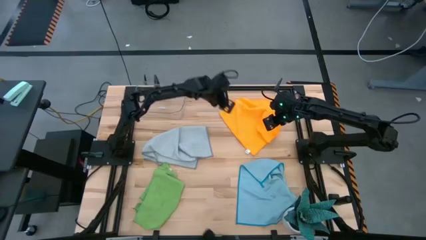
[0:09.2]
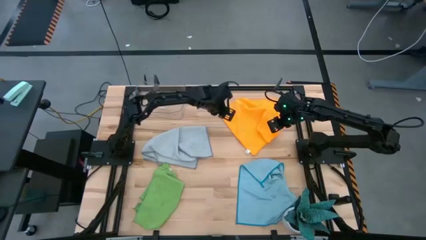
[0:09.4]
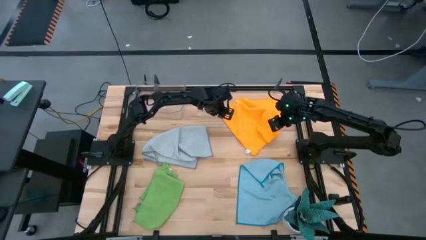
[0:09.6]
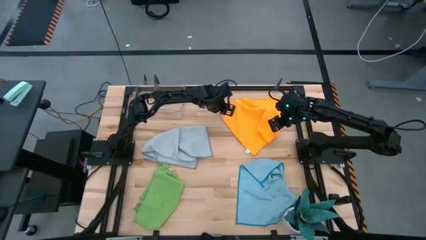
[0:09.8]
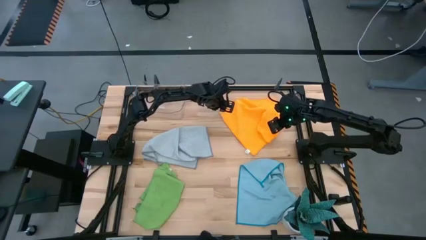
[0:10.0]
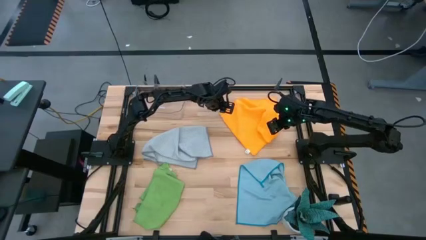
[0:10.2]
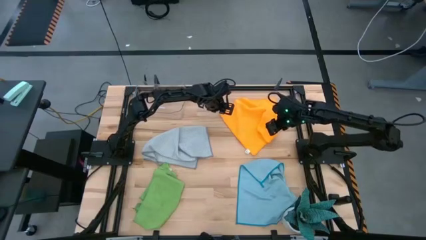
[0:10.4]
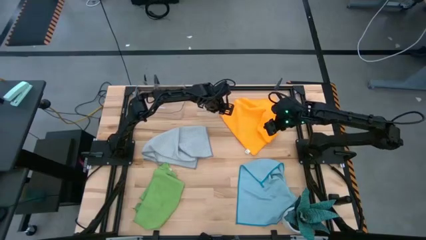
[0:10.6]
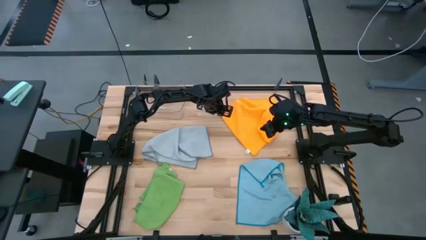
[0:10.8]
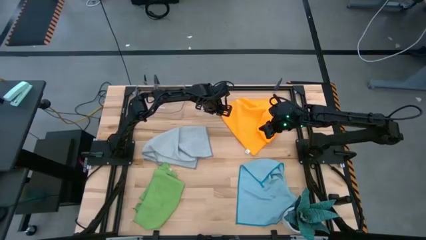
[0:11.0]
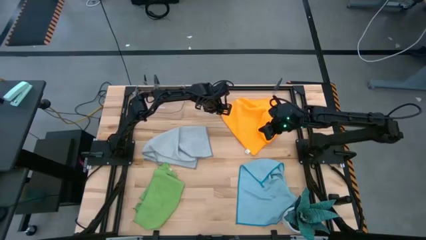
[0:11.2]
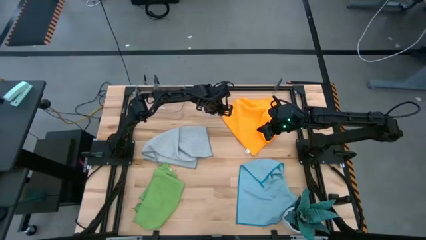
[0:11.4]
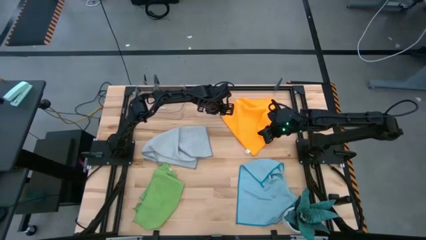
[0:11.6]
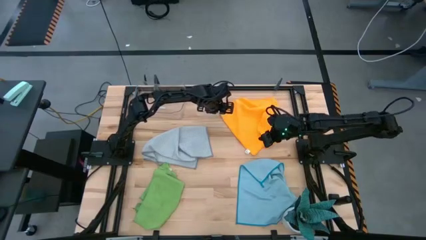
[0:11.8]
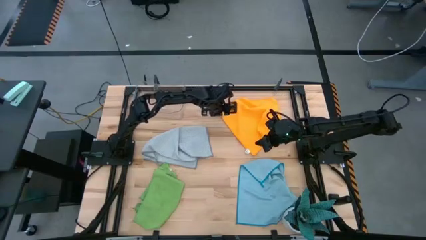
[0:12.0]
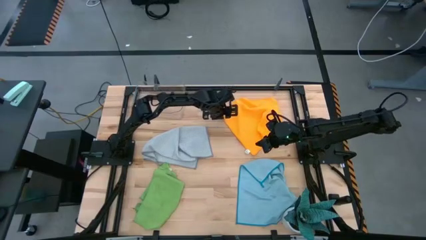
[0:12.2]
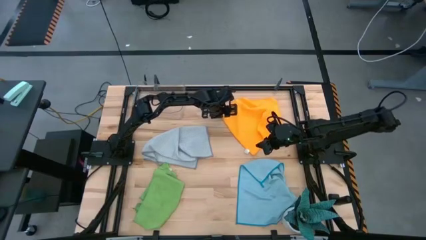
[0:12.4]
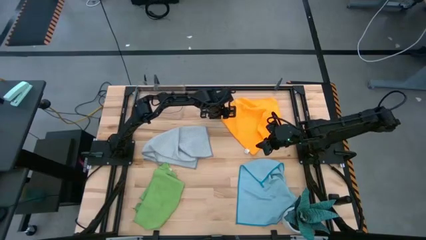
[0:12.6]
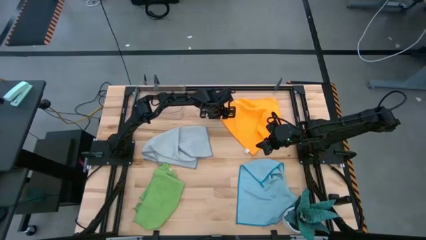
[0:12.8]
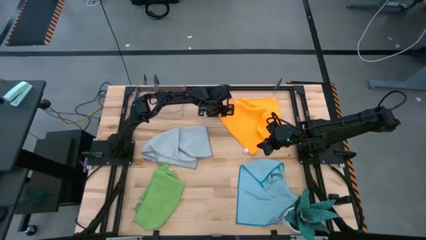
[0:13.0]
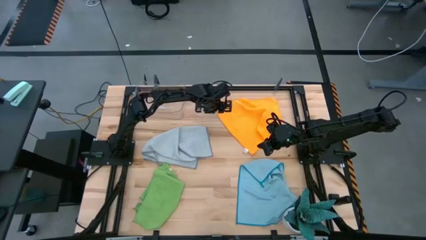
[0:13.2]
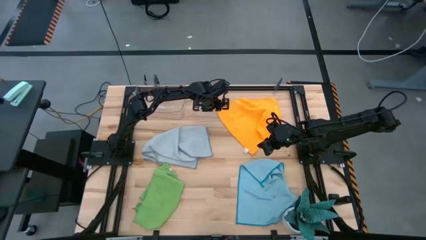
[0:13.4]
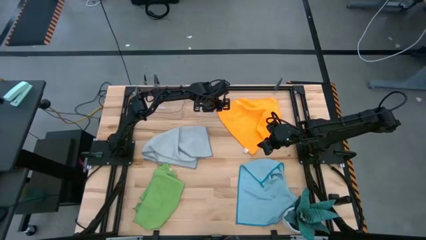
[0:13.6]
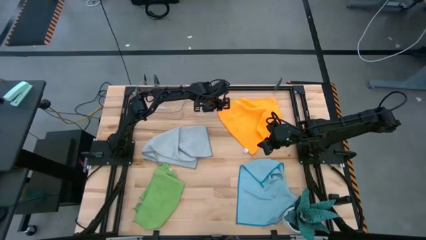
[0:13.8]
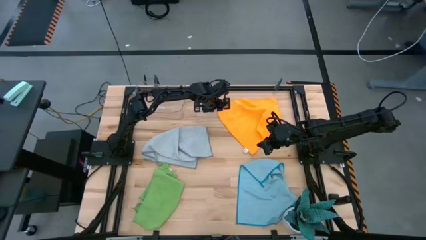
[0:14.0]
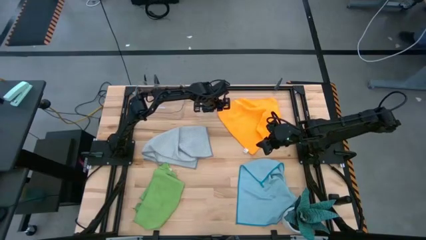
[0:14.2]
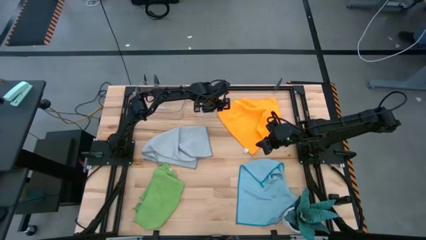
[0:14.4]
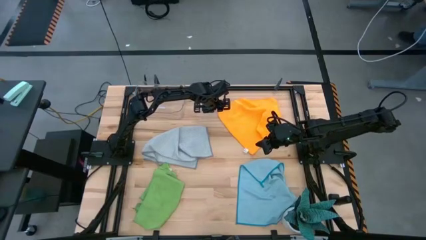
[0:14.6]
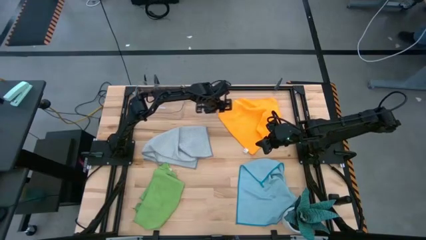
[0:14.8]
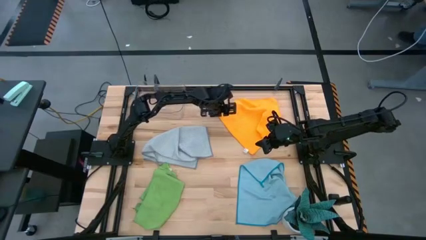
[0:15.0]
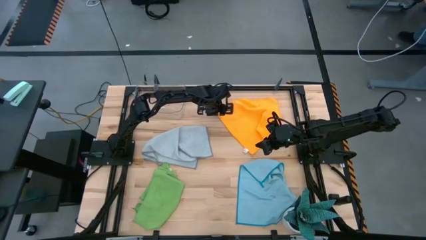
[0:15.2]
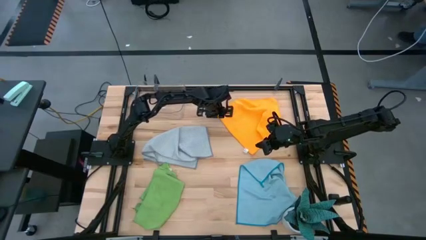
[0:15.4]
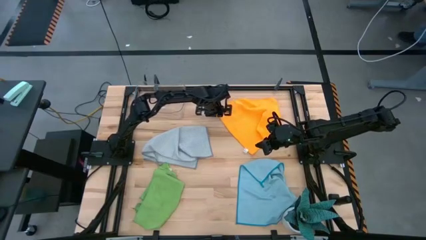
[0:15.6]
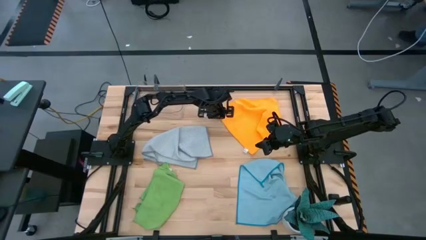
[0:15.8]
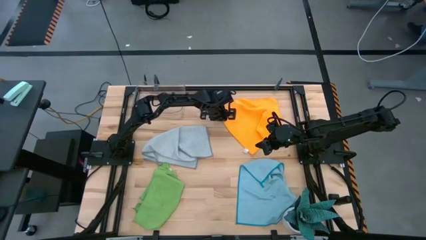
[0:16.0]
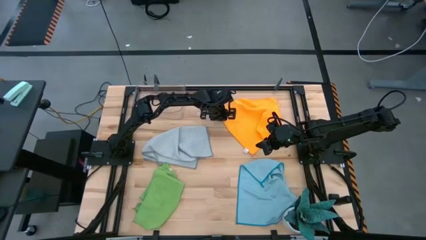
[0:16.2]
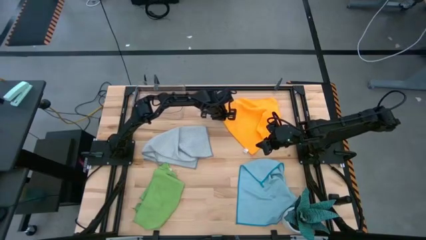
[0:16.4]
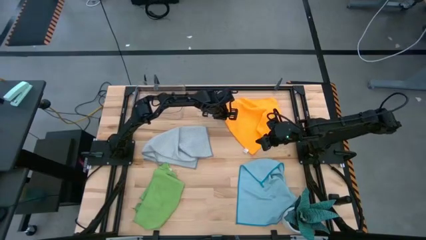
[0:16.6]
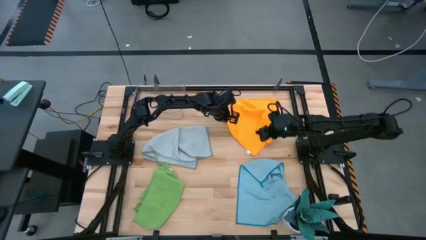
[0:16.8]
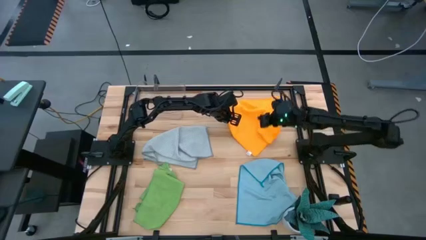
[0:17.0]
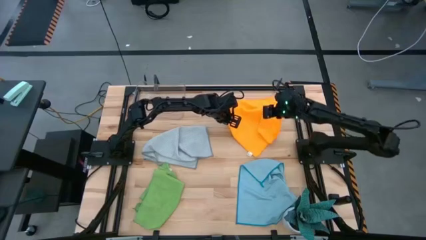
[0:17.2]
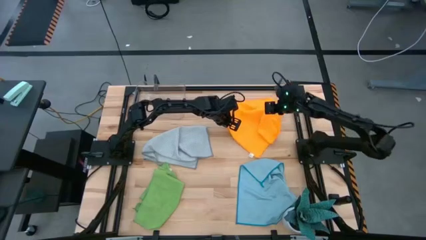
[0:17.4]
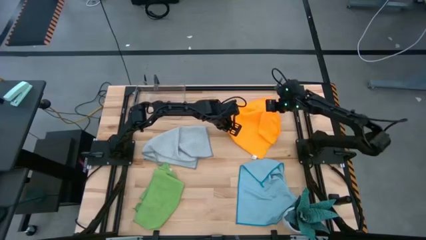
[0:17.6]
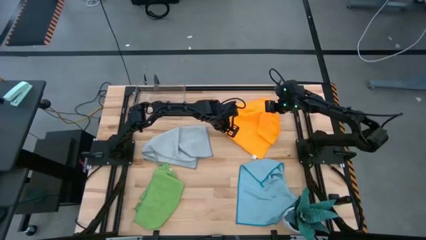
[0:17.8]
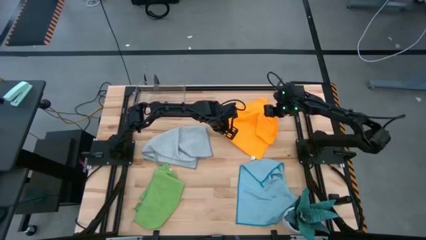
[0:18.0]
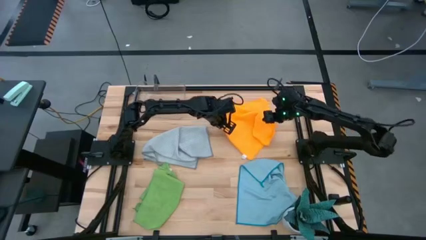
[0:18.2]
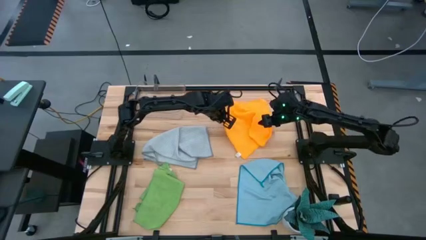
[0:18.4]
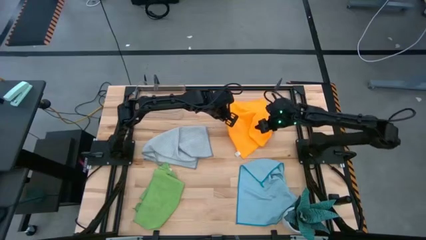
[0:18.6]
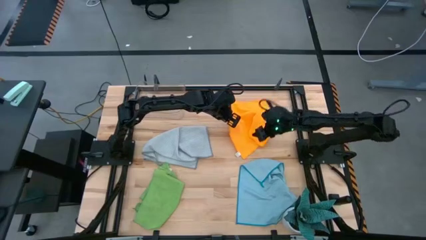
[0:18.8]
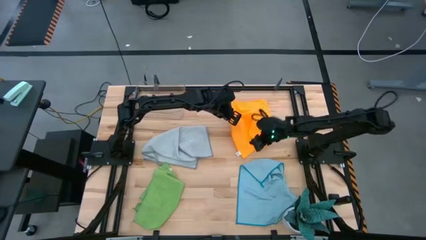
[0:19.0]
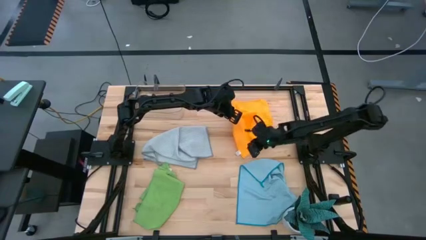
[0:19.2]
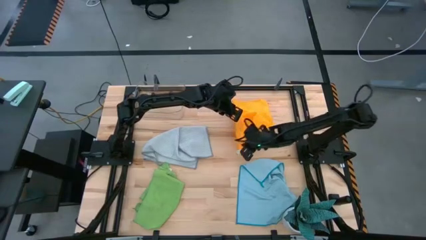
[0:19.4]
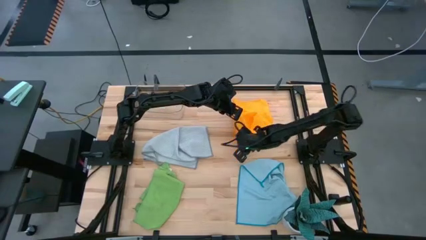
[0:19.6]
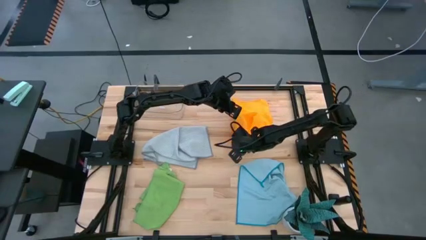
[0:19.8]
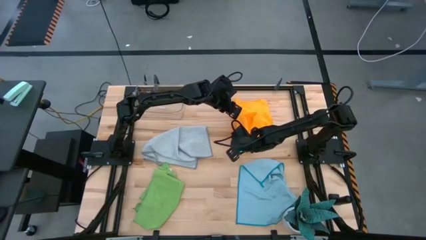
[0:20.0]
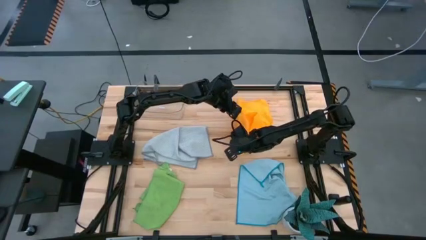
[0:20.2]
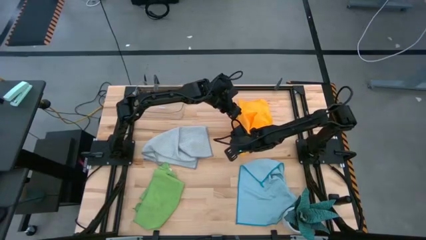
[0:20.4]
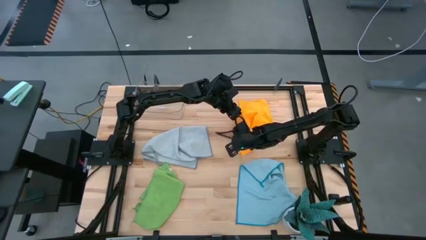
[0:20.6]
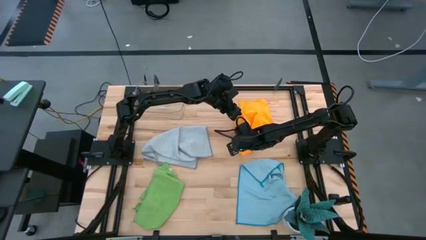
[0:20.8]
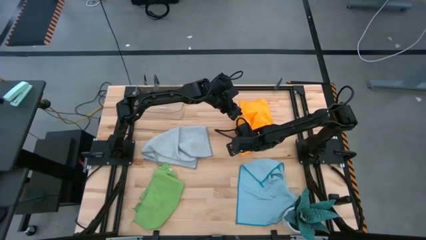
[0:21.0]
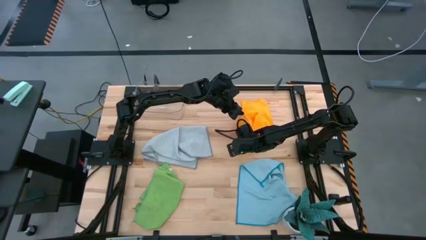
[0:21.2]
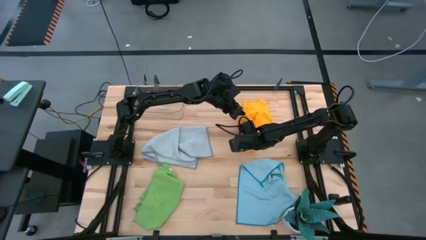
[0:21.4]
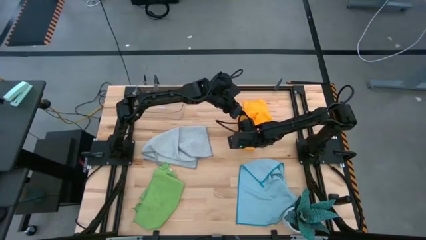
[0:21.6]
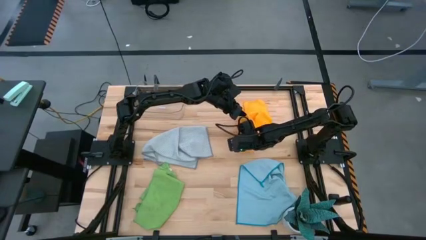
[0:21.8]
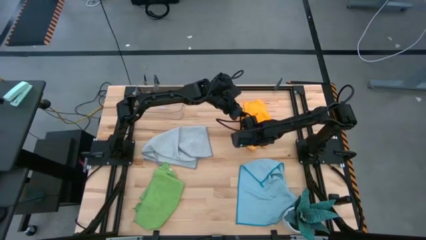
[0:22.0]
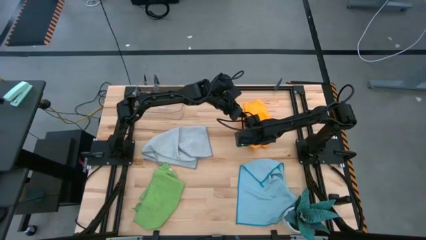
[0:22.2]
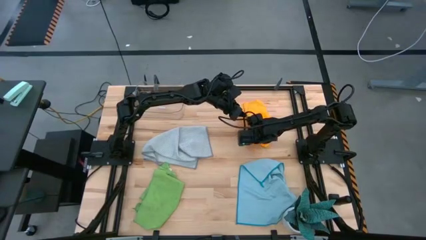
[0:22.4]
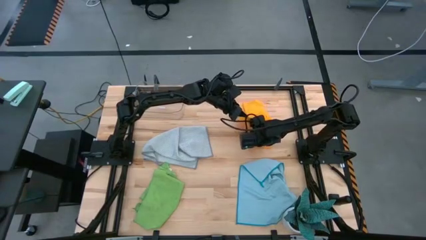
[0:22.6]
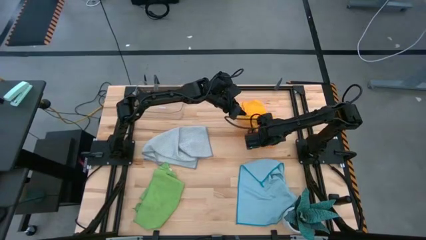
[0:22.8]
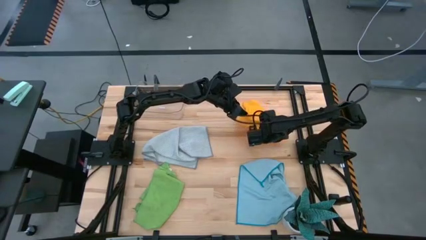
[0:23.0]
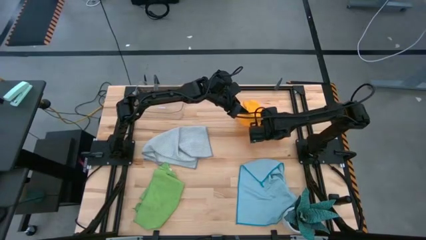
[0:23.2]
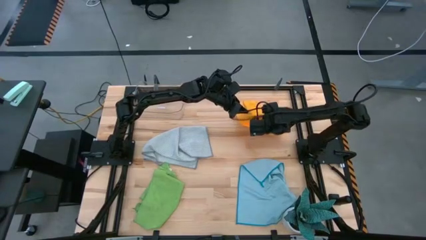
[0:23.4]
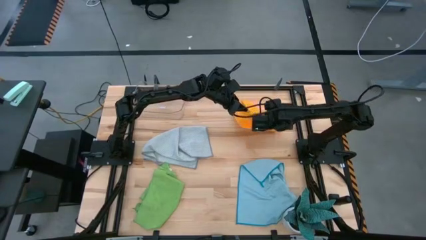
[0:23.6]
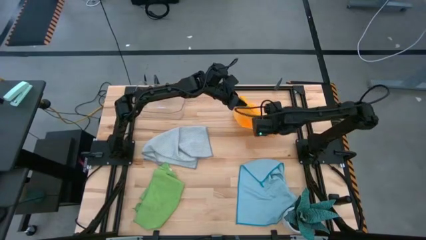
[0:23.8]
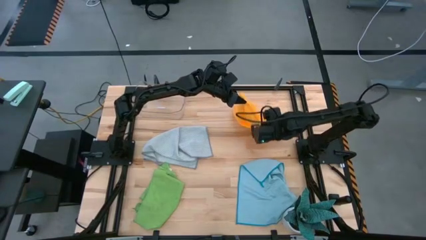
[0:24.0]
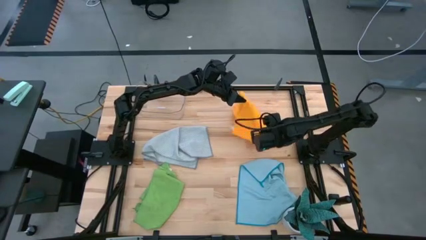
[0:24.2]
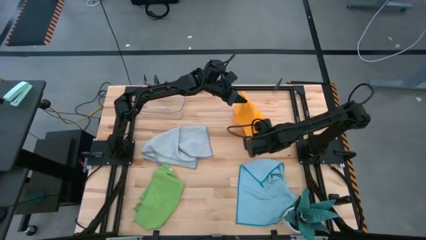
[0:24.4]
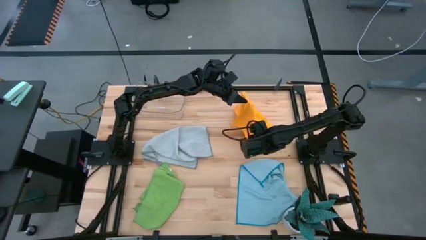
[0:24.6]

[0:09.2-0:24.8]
Task: Fold microfiber towels
Fold the orange microfiber cloth
